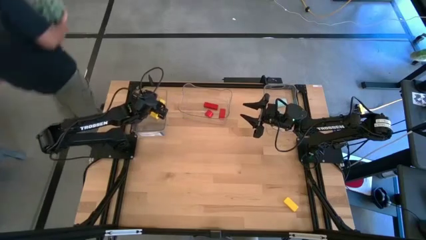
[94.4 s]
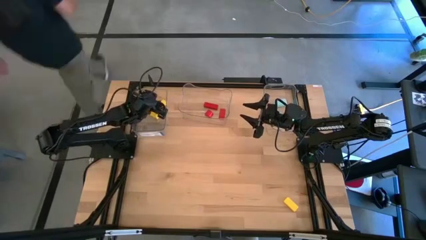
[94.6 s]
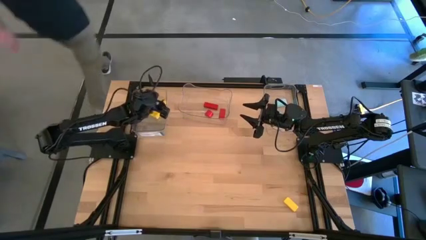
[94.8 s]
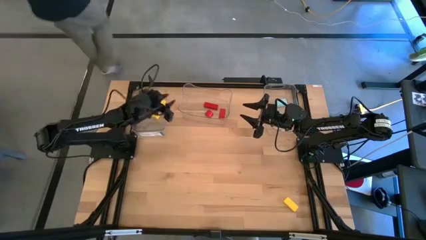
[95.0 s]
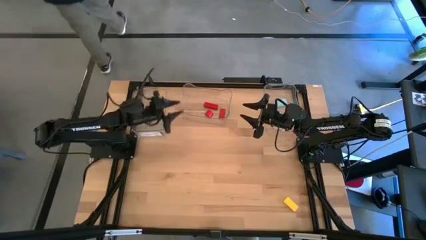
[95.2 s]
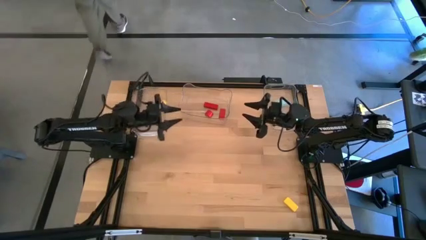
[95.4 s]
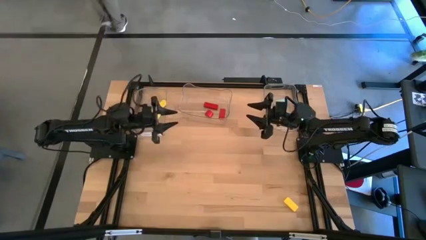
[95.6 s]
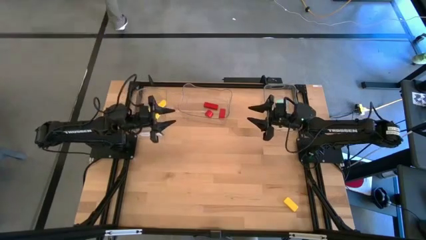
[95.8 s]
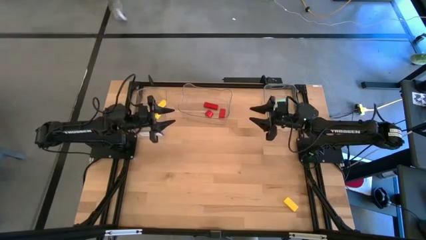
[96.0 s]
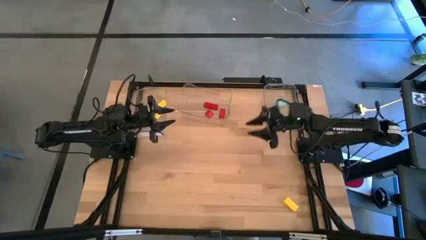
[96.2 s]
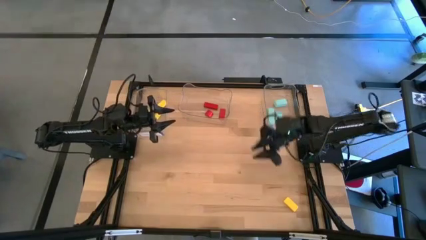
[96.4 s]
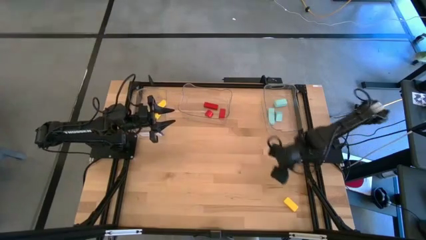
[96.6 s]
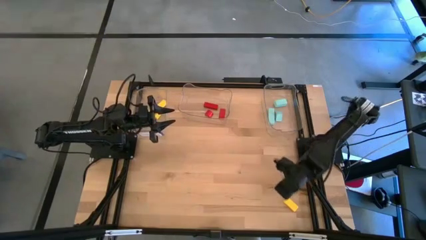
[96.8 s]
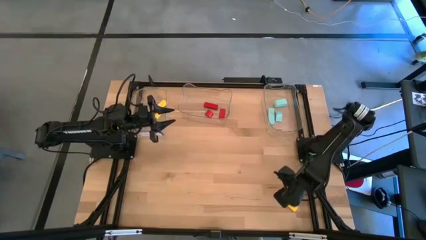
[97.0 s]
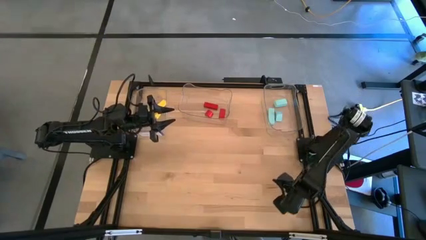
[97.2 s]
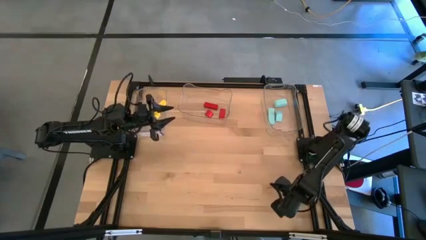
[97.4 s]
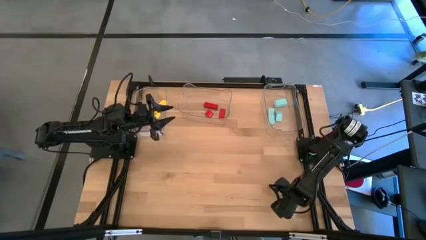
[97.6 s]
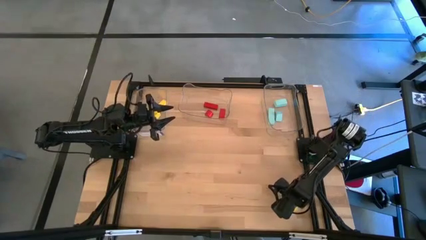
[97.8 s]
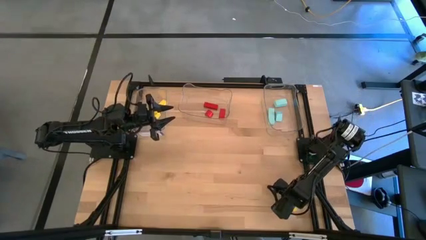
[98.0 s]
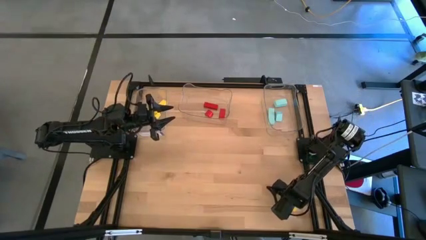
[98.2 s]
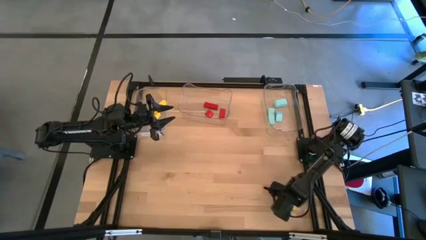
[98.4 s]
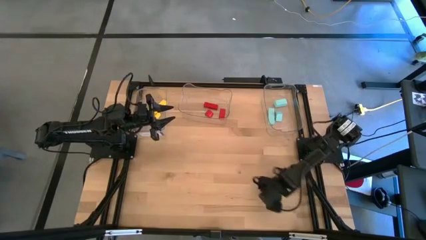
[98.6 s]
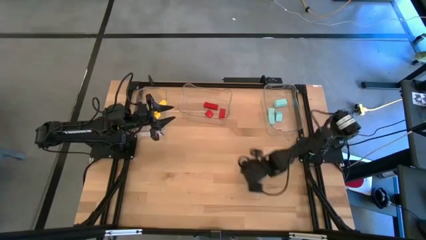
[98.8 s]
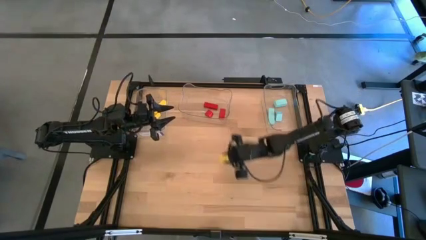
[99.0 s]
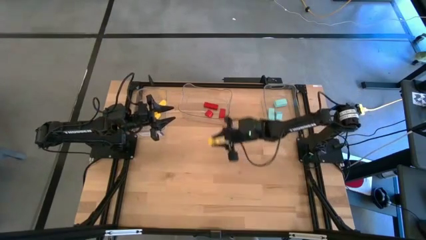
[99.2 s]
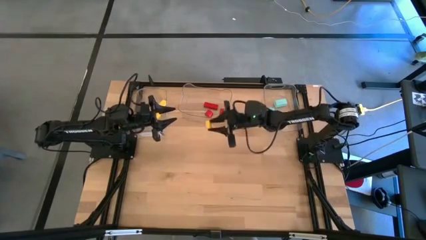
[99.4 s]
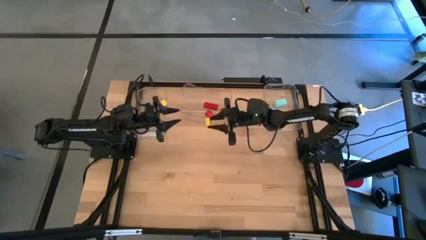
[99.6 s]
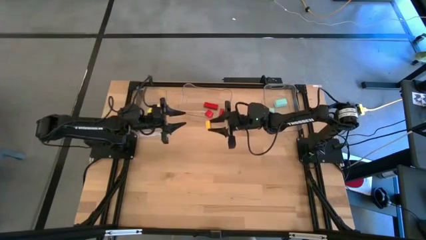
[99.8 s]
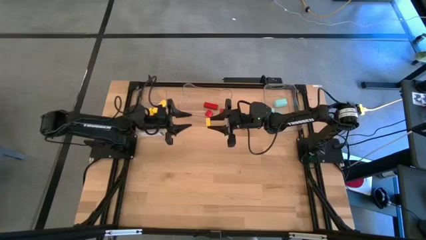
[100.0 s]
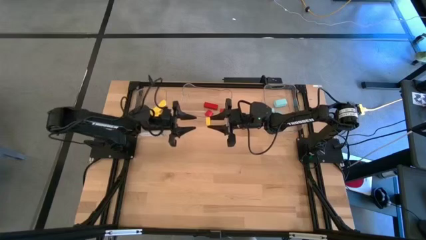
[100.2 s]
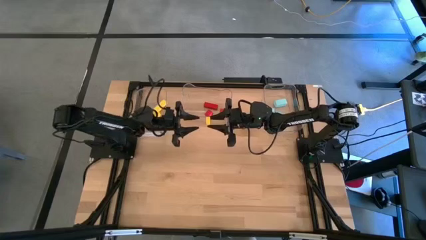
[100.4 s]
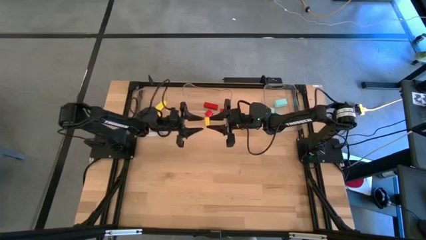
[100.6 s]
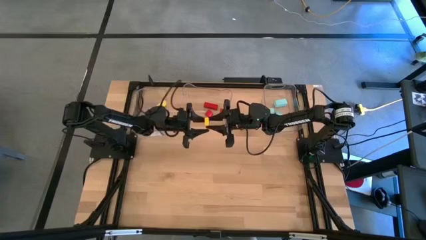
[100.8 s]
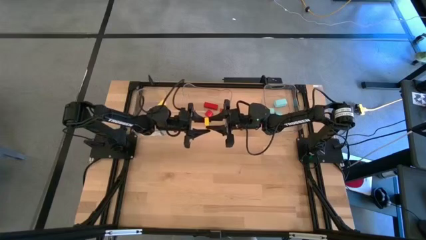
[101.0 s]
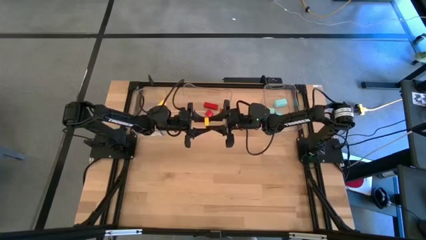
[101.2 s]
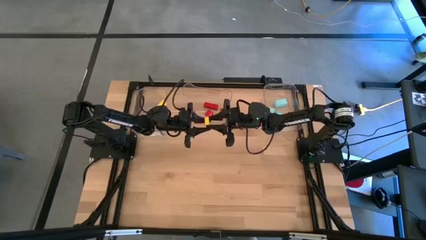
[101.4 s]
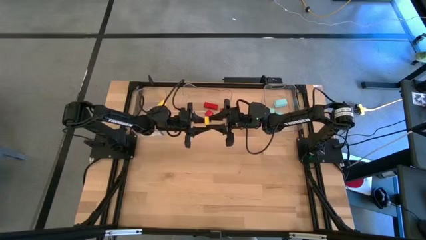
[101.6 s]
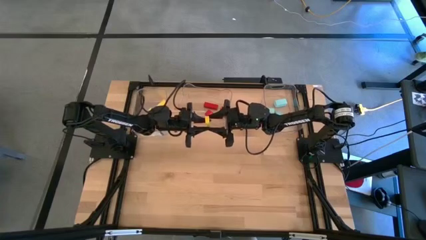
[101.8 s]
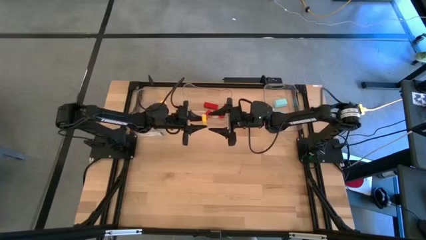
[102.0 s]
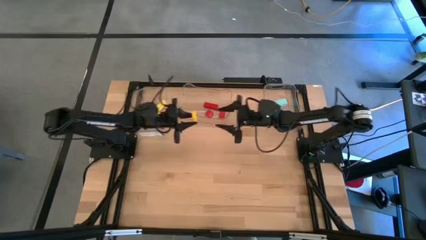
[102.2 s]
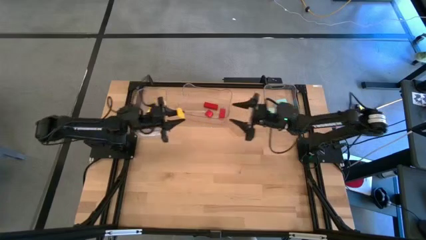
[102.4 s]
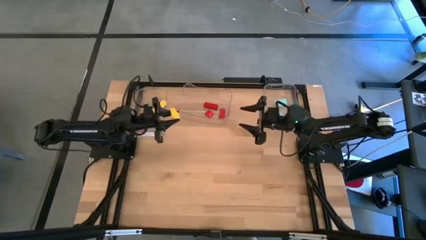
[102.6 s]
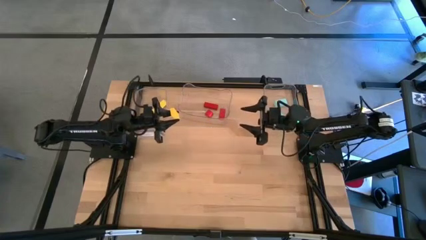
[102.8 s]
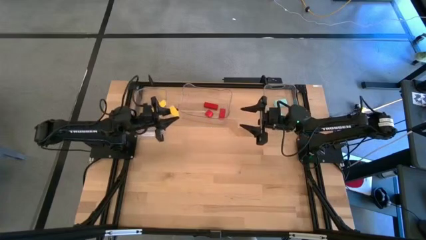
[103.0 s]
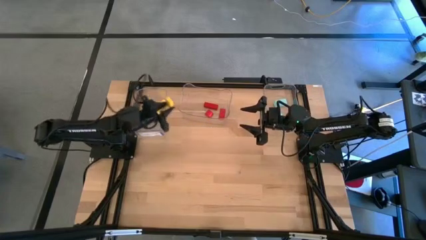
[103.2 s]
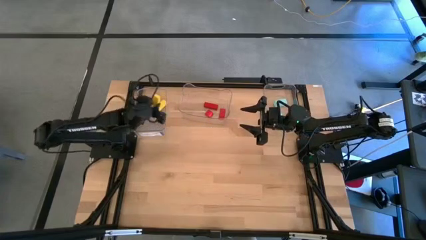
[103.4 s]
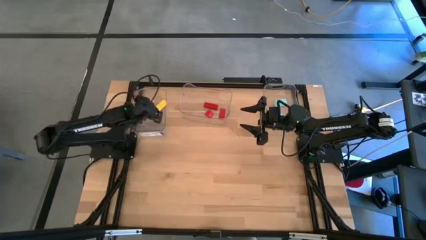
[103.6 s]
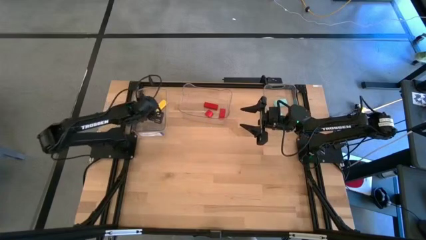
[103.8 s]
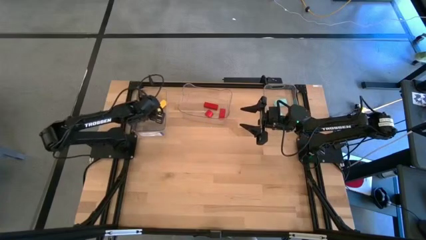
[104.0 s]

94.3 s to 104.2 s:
Task: Sort & place blocks by color
Put the yellow block into the left transparent bin

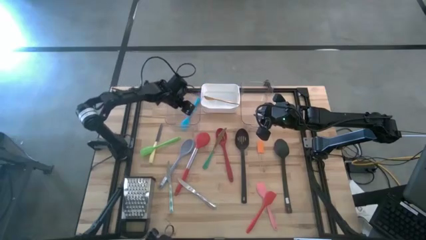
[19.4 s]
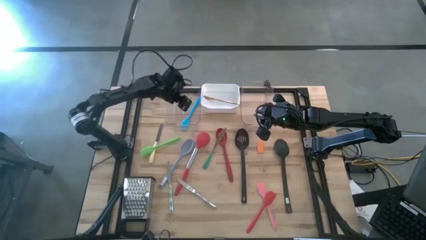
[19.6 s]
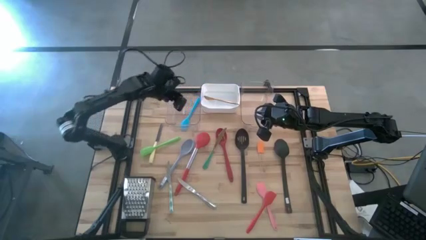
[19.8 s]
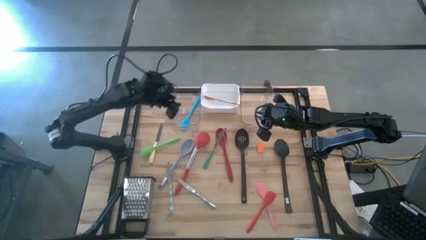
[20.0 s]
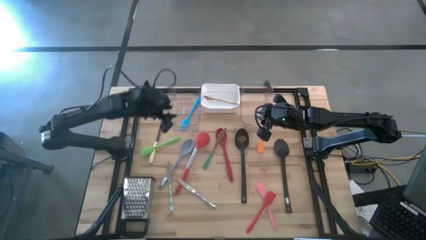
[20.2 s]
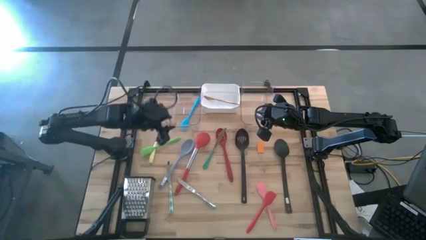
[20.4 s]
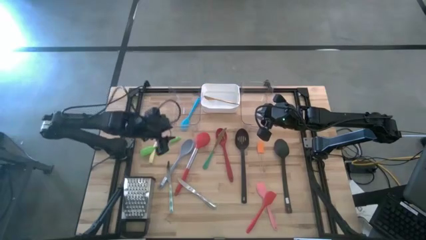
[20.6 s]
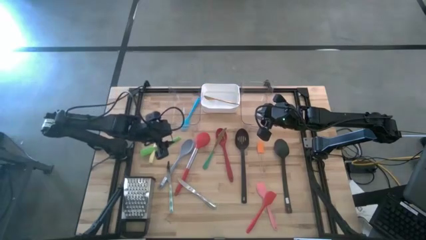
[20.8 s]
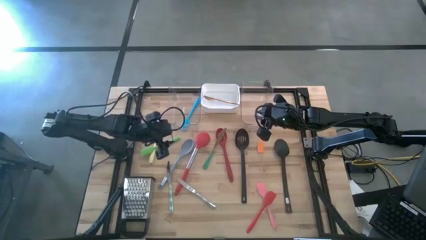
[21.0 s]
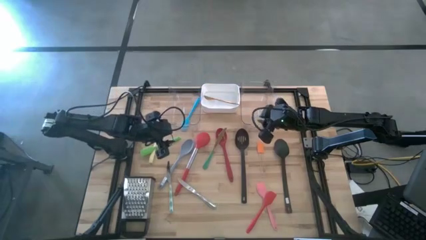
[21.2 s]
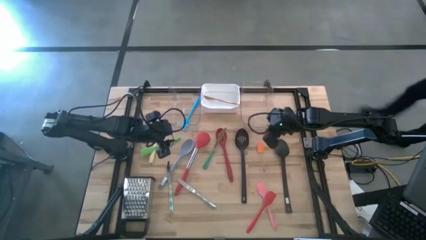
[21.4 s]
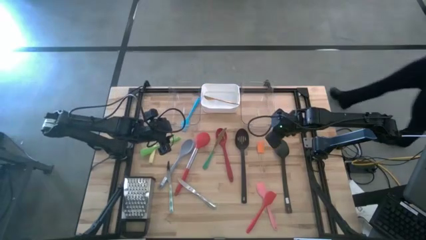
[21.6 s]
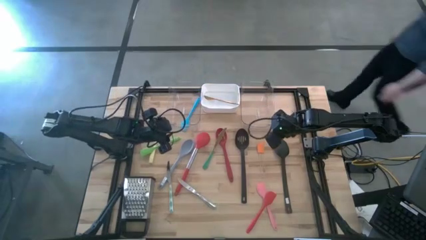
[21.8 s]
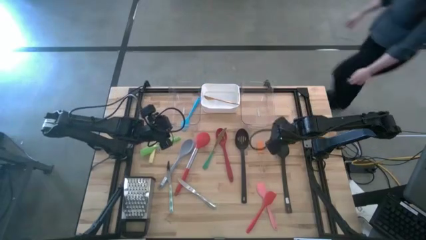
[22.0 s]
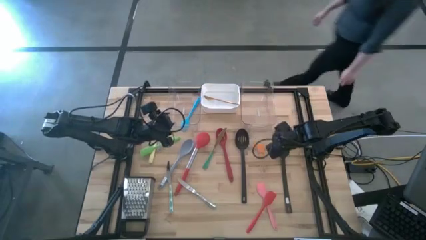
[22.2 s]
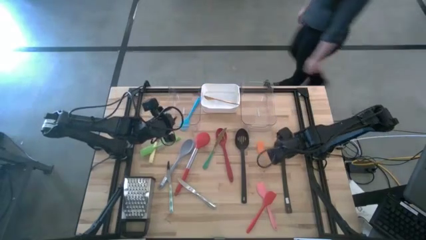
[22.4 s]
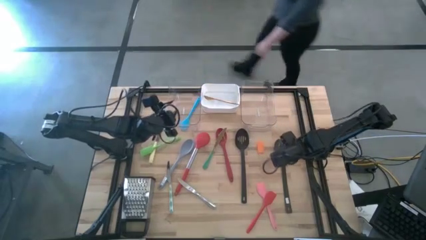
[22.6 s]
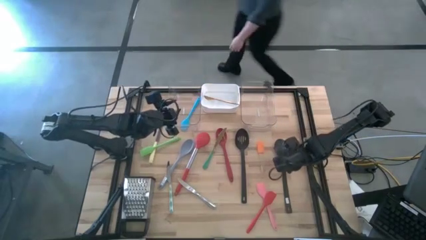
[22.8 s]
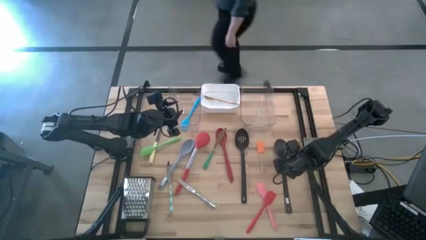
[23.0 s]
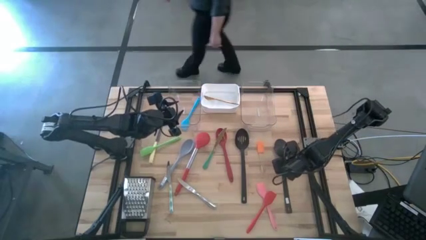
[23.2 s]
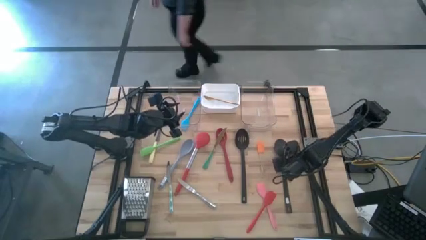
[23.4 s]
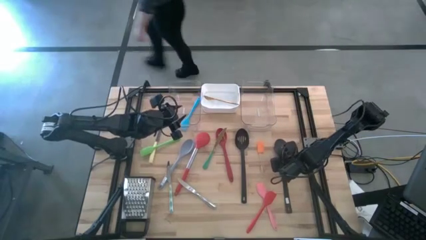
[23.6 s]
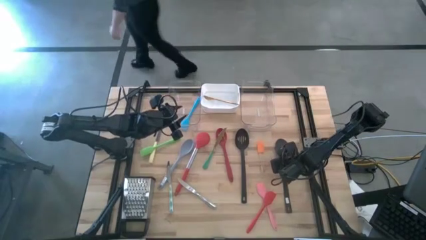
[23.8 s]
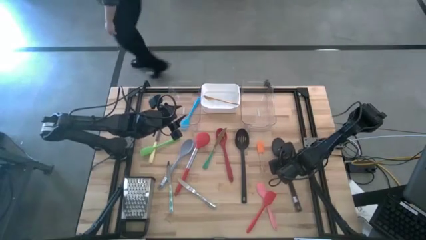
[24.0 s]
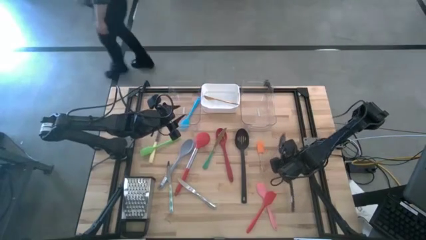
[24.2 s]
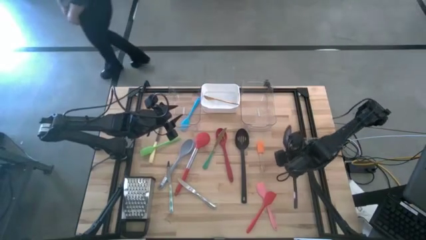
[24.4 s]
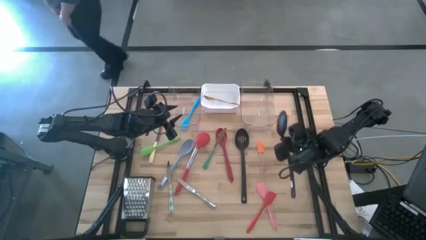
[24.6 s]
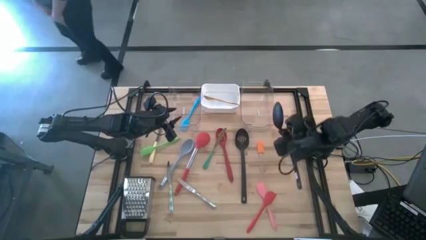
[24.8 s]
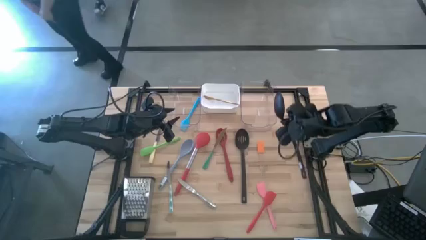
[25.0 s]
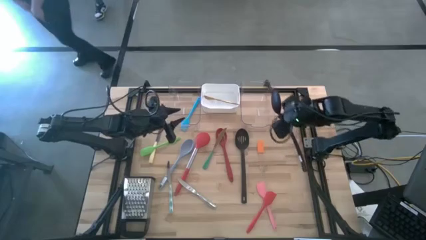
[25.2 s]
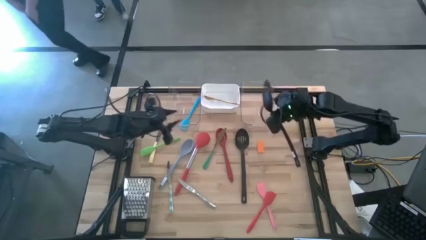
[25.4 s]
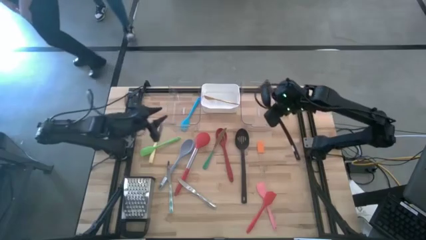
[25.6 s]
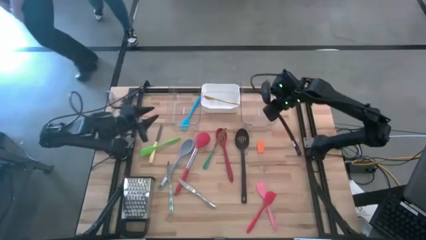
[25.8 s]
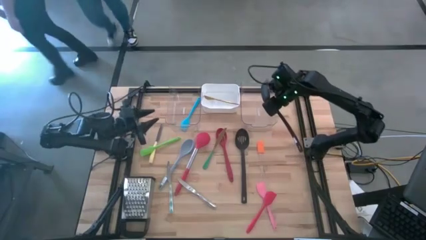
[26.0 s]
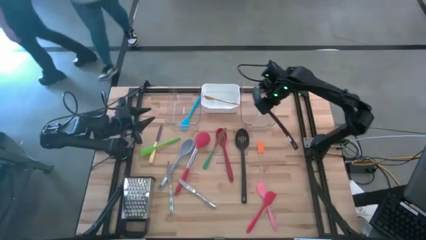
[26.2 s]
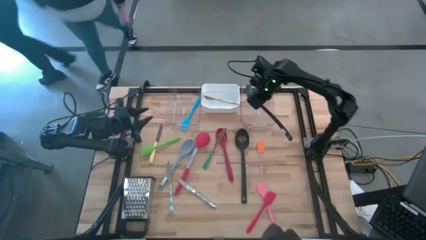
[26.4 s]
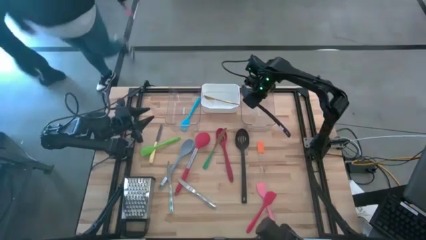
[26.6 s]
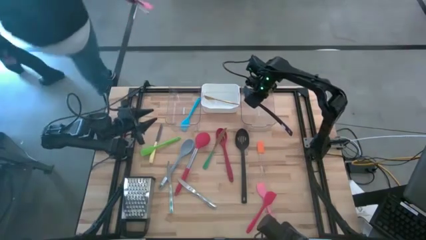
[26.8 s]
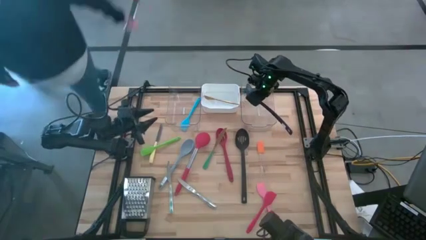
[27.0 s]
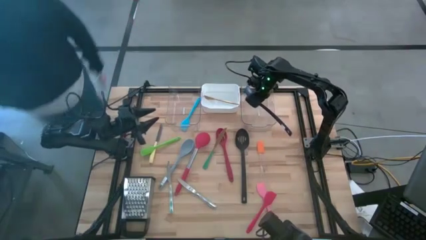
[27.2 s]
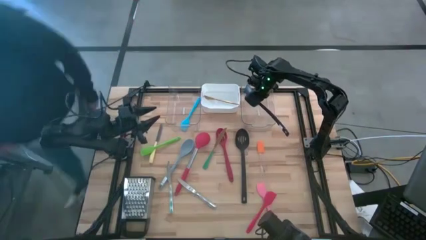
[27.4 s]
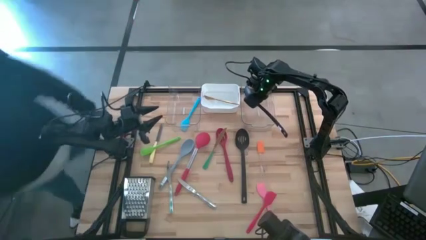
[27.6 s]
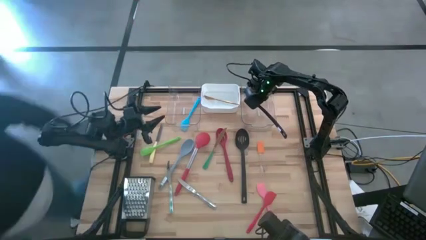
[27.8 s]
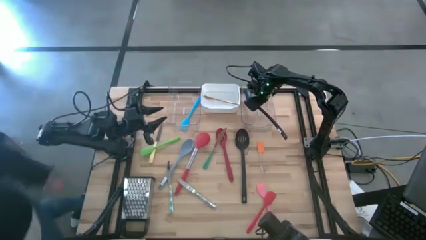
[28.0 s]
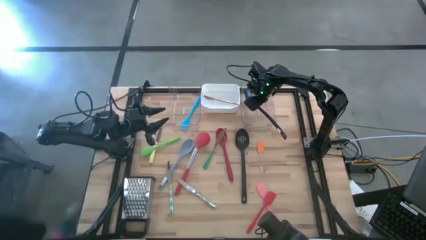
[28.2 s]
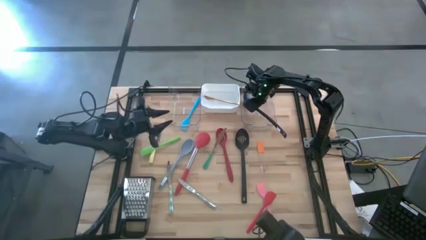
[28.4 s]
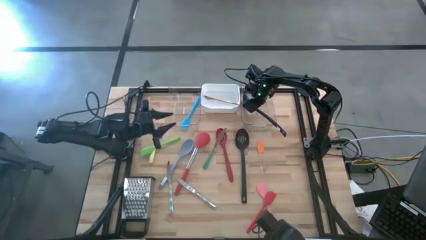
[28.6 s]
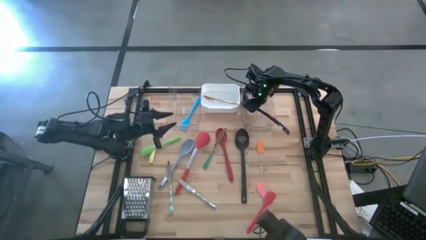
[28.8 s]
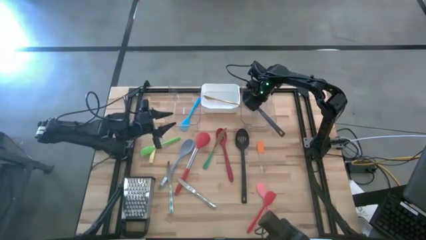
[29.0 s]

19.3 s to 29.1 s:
Task: Pick & Place Kitchen Items
Put the right black serving spoon into the right transparent bin
